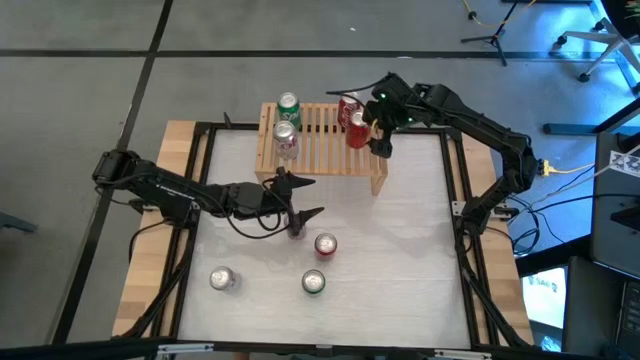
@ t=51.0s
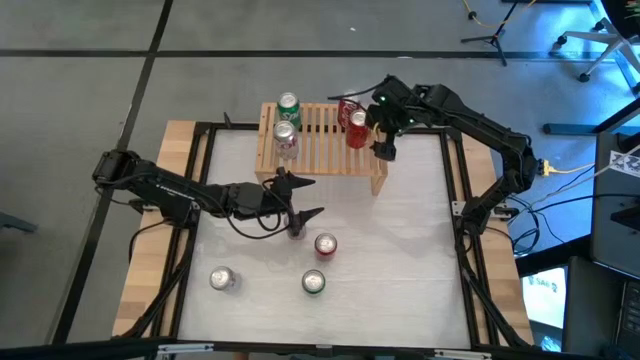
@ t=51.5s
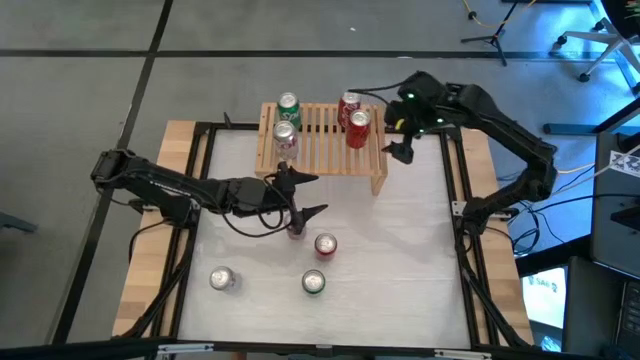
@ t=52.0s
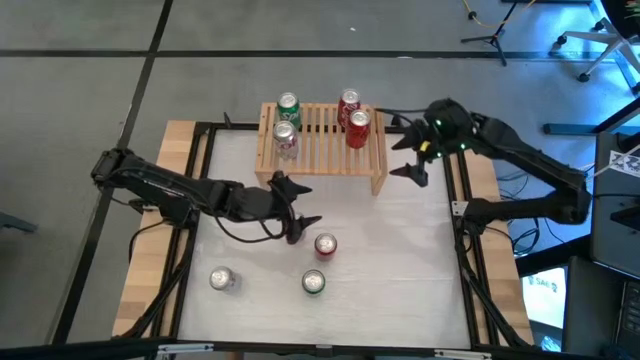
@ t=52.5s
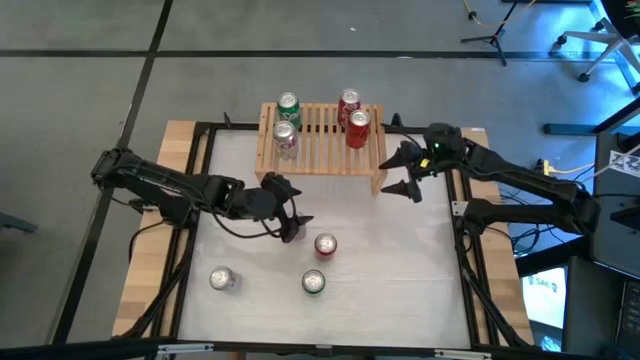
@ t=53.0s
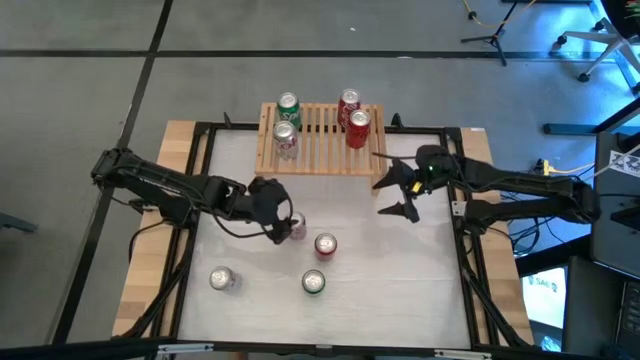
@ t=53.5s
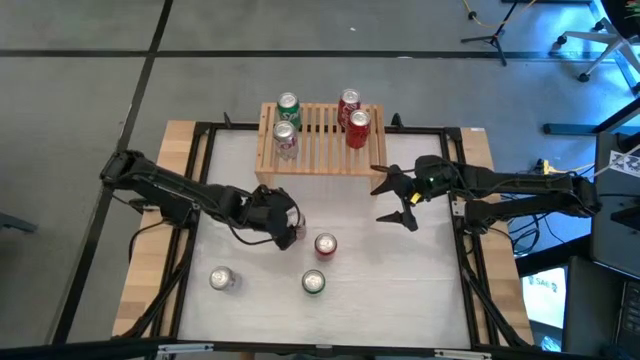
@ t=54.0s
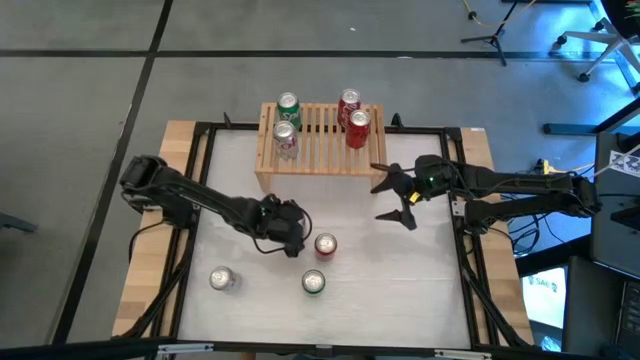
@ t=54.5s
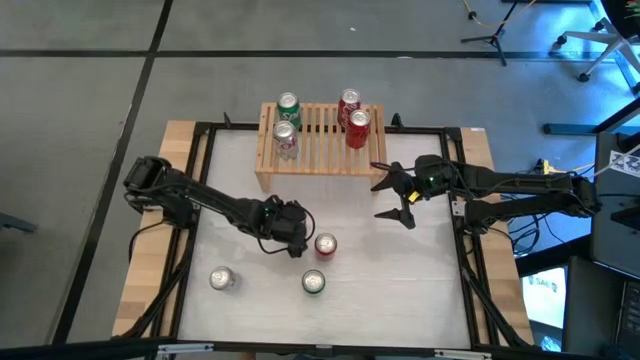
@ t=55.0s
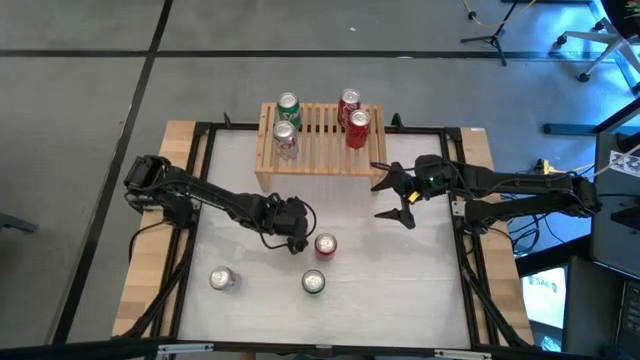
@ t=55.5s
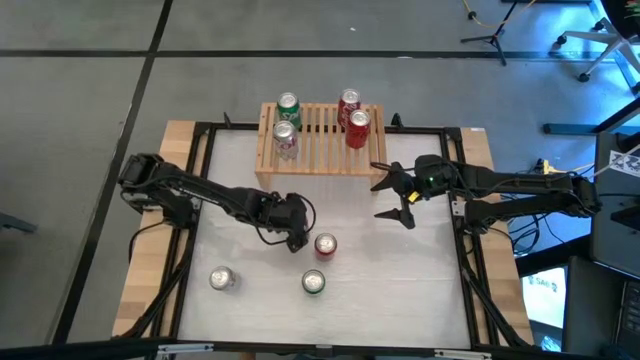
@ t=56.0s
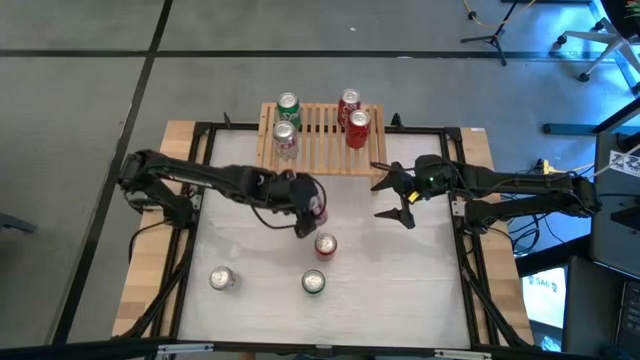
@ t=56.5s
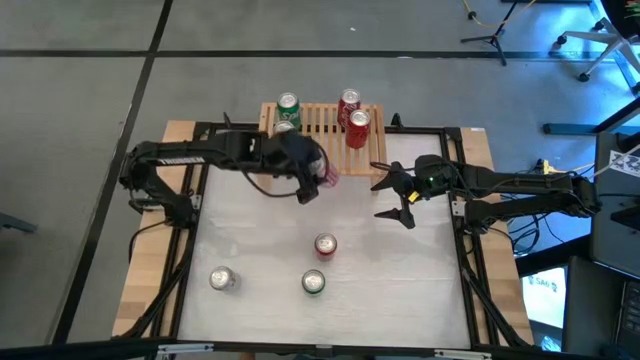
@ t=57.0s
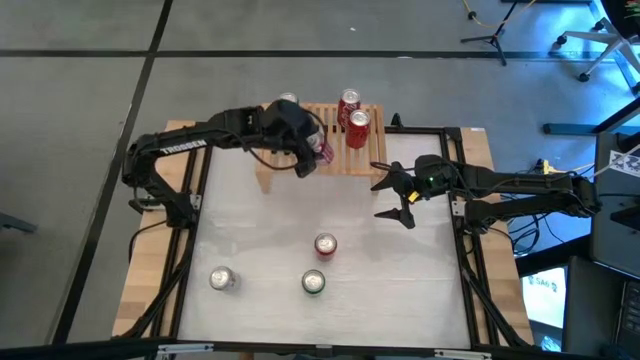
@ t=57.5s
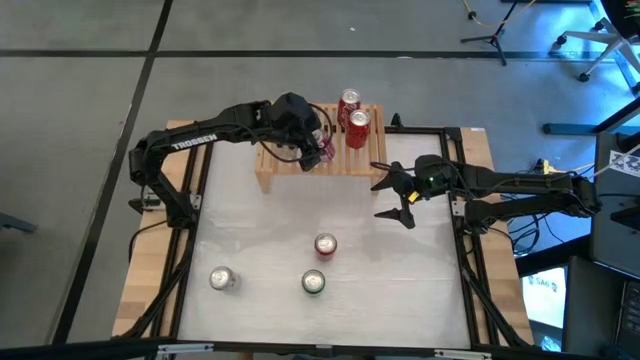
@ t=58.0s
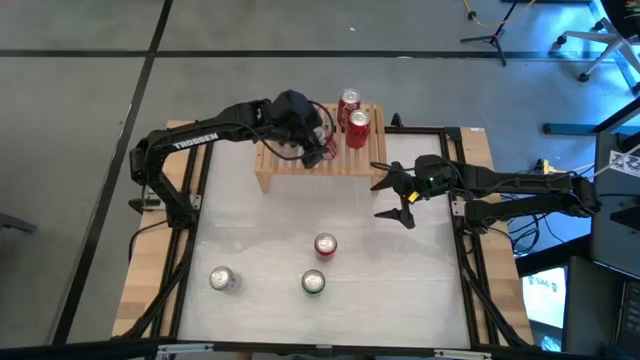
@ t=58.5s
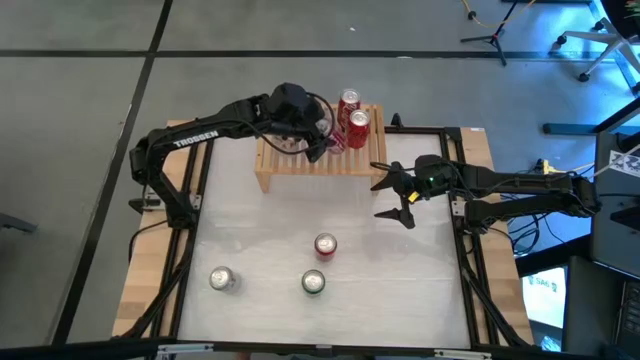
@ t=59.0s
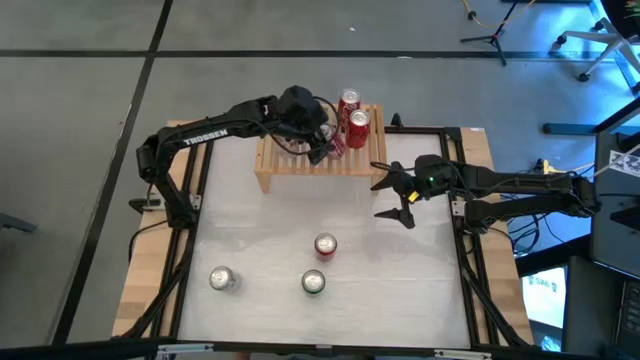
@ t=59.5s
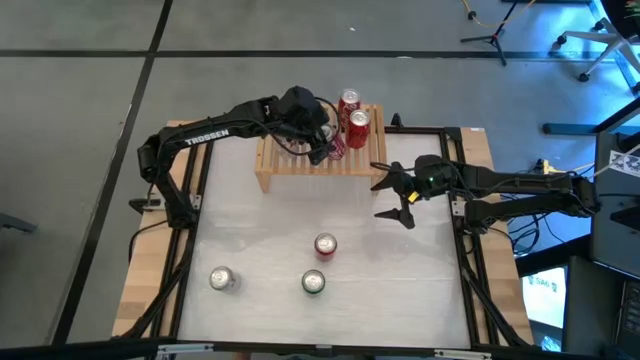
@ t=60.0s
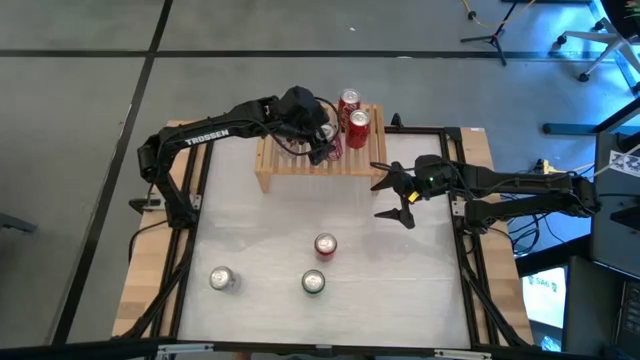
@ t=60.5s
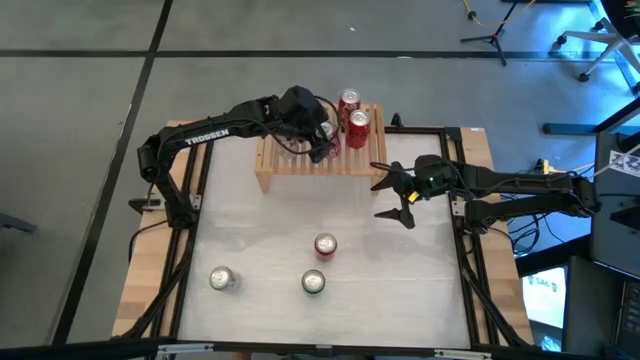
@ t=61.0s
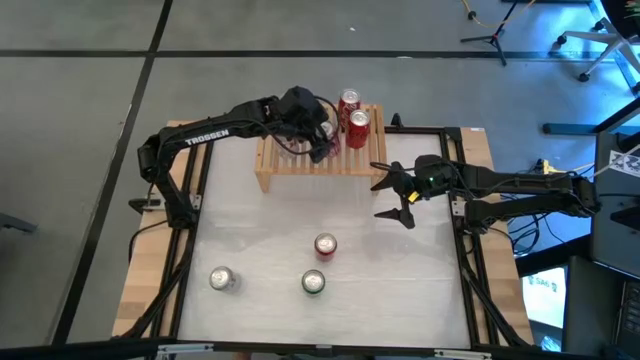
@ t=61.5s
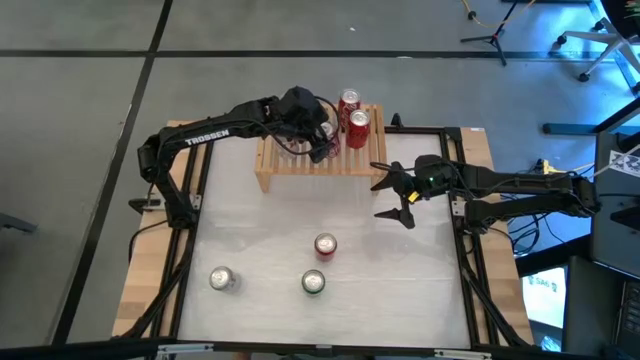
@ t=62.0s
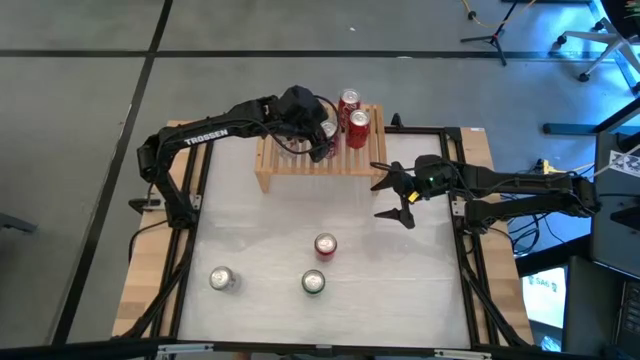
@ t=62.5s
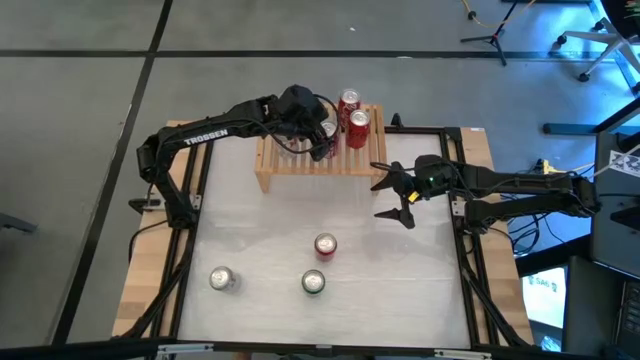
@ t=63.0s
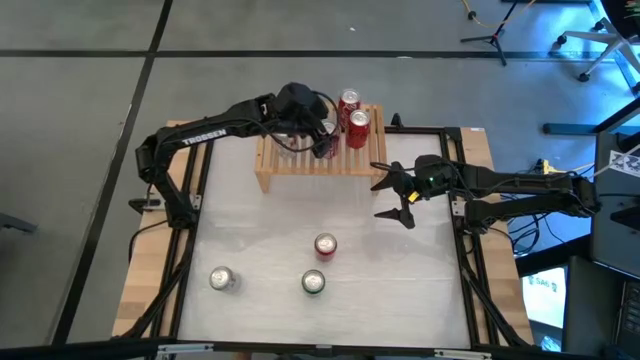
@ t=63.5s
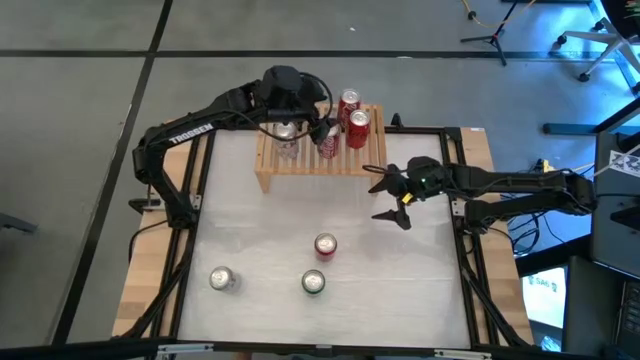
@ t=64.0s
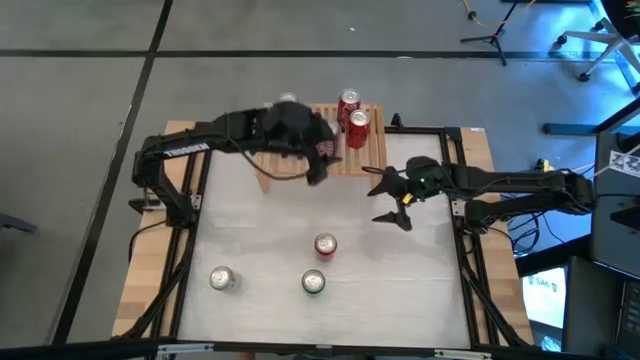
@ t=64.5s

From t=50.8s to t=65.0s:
Task: Place canned beverage on shelf
Put the red/white soda can on the shelf

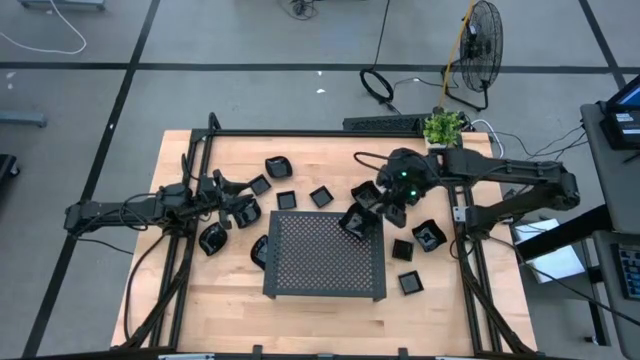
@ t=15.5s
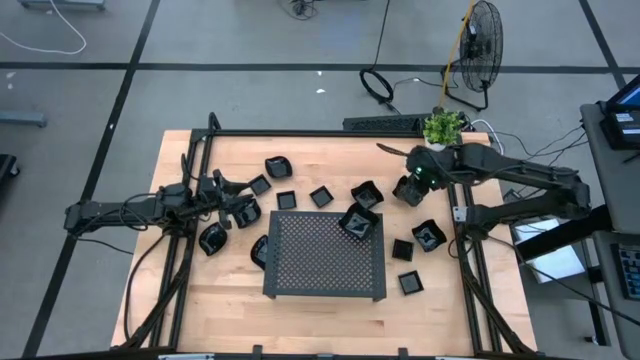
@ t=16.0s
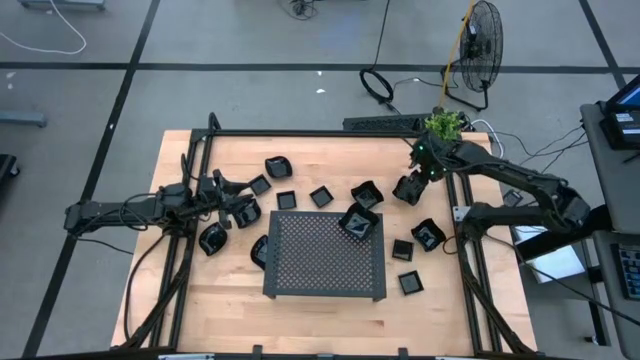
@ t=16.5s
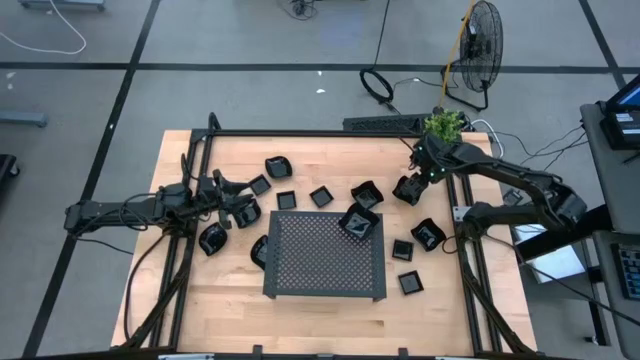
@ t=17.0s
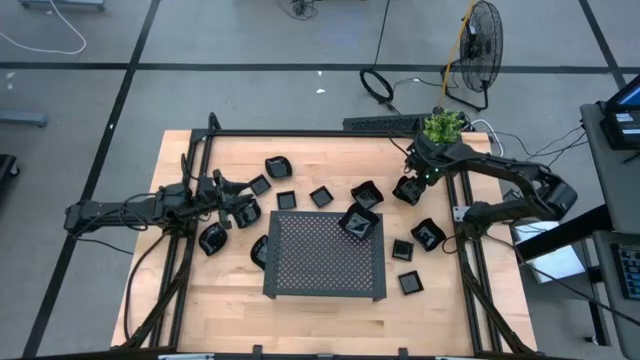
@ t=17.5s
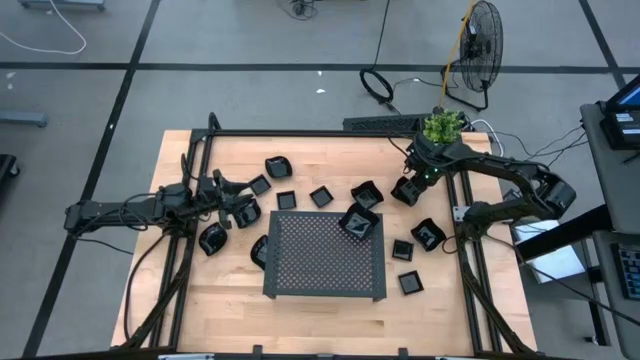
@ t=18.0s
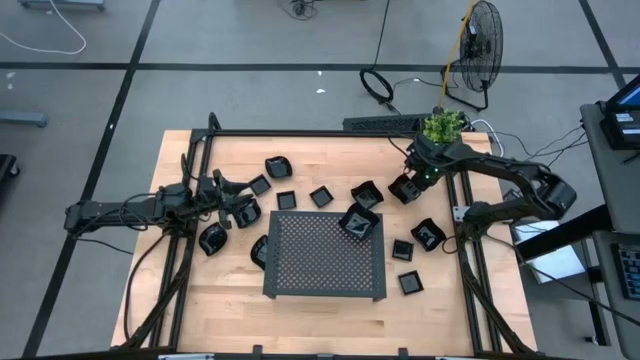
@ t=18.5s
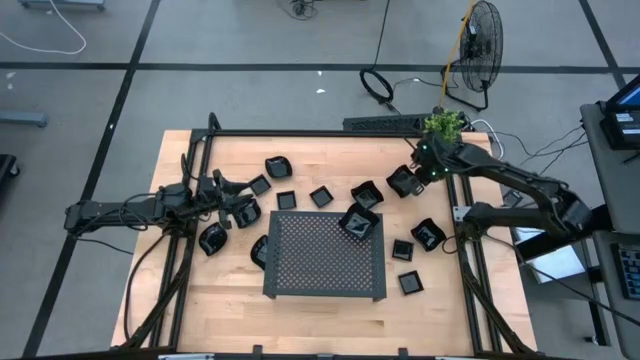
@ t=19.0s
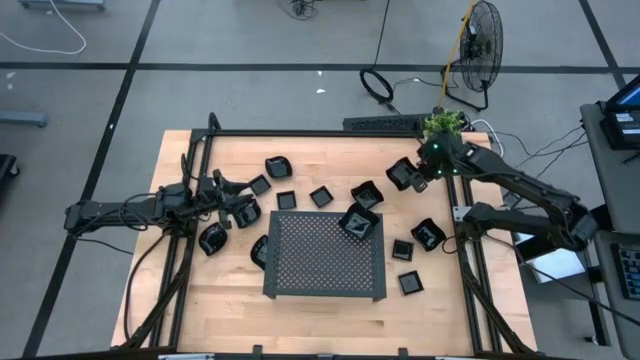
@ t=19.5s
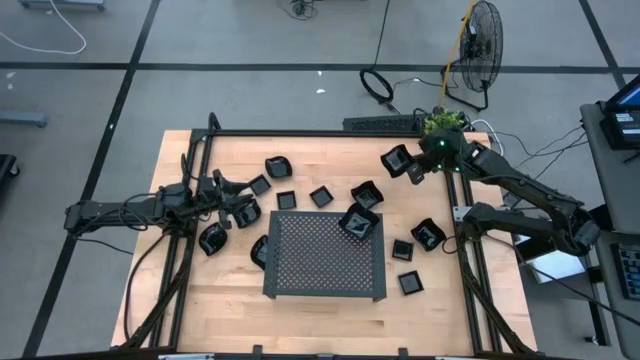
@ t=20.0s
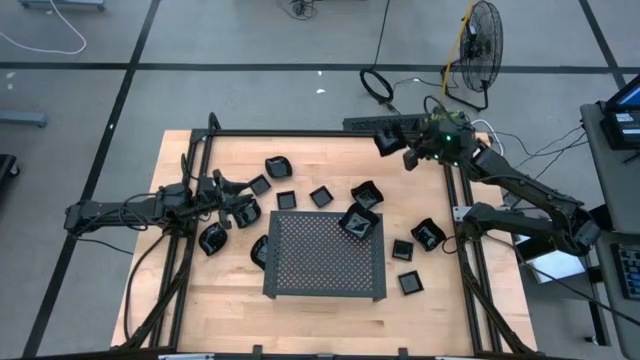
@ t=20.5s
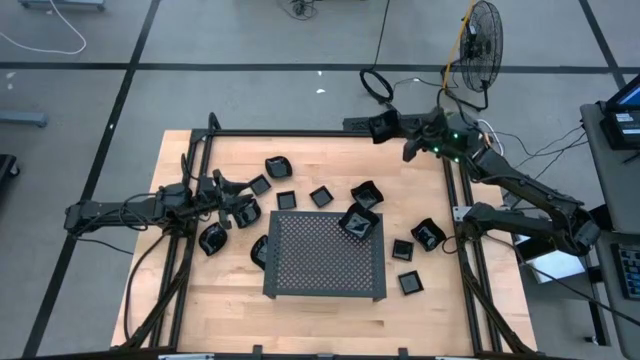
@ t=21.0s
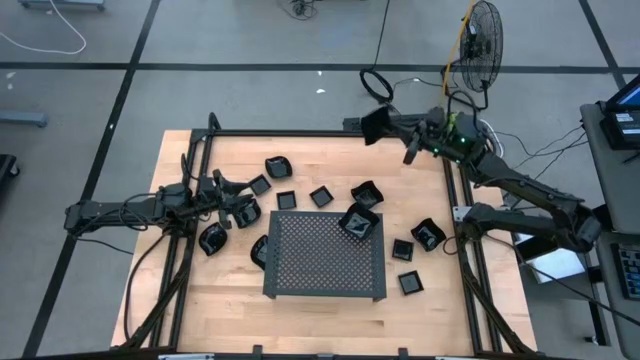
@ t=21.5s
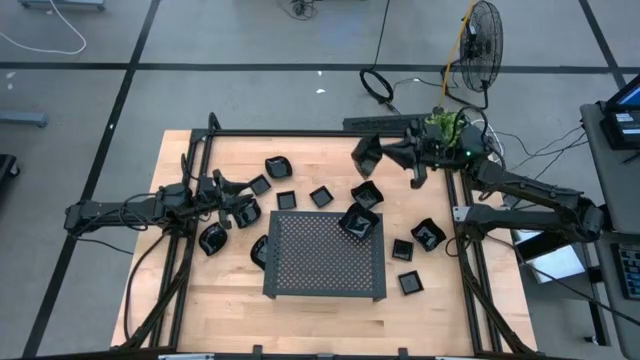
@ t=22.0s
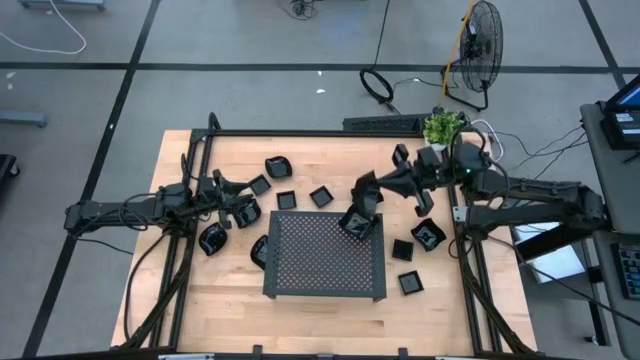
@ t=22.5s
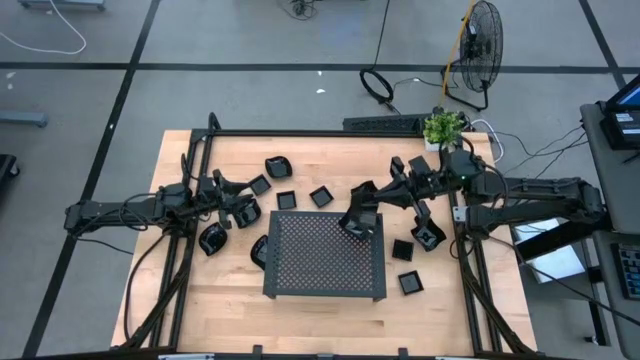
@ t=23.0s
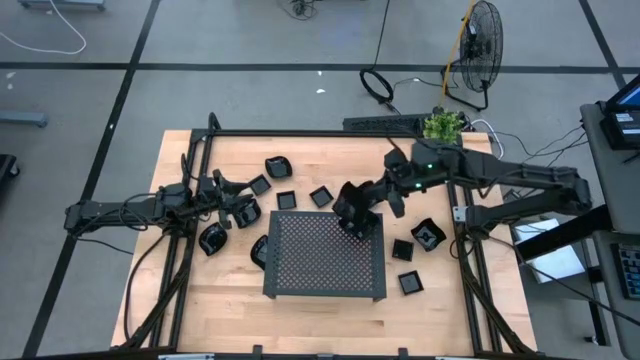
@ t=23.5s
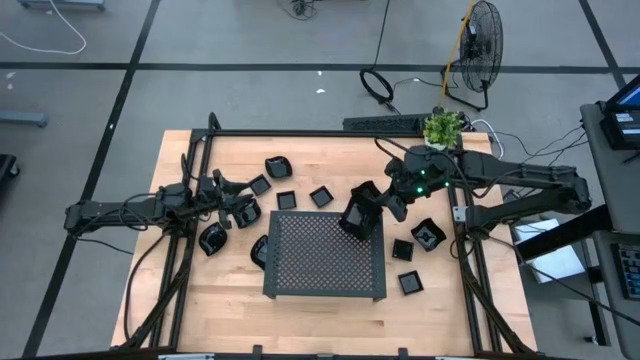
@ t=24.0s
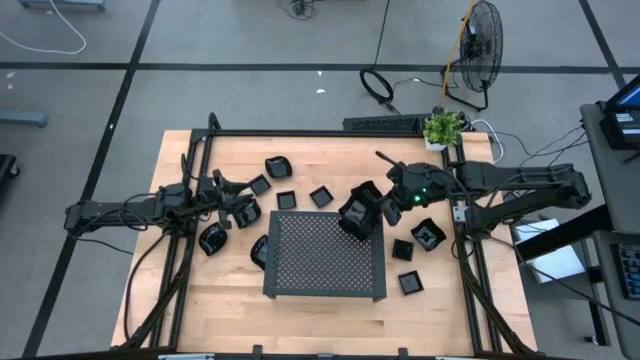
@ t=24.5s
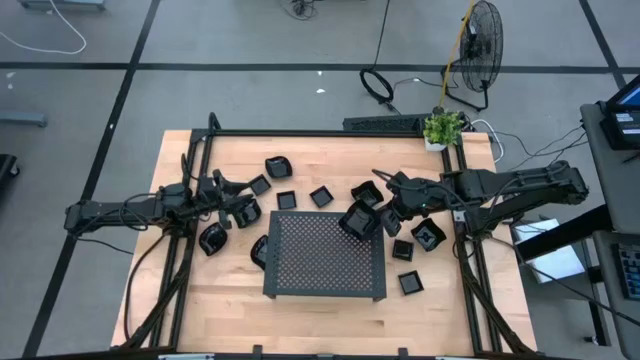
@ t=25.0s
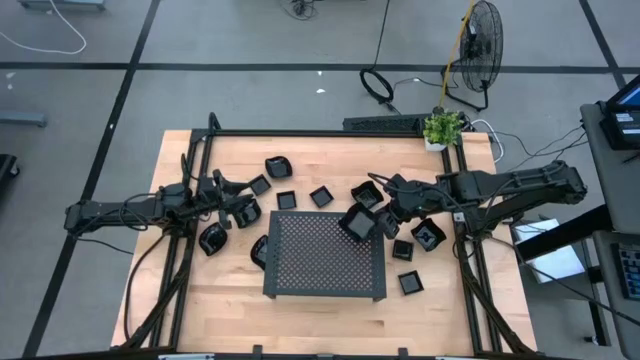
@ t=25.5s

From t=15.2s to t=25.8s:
Task: Pick & Place Mini shaped plates
Stack the black distorted square plate on top of the black distorted square plate on the shelf
